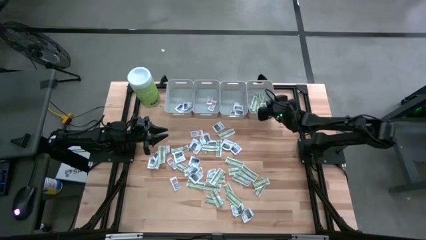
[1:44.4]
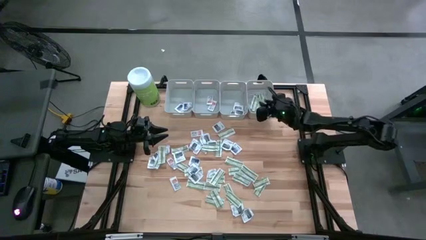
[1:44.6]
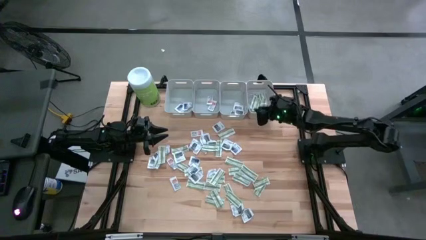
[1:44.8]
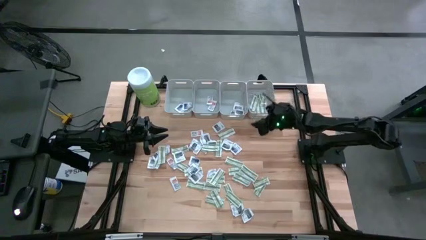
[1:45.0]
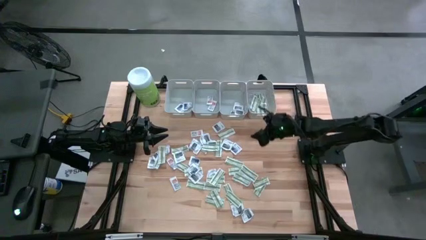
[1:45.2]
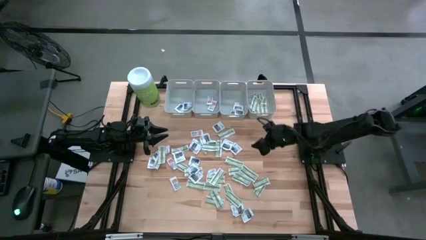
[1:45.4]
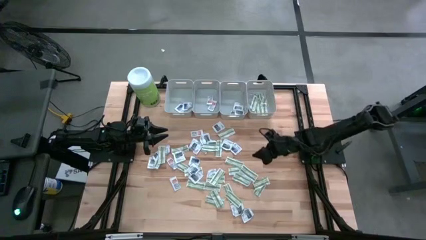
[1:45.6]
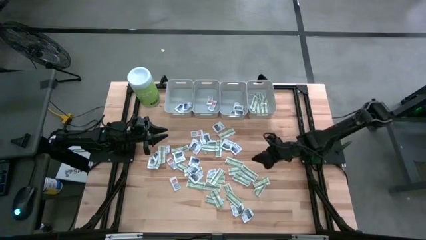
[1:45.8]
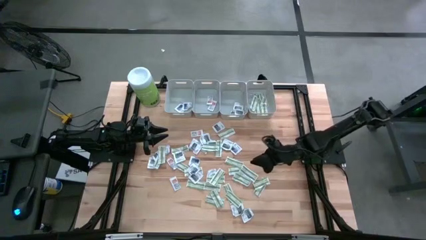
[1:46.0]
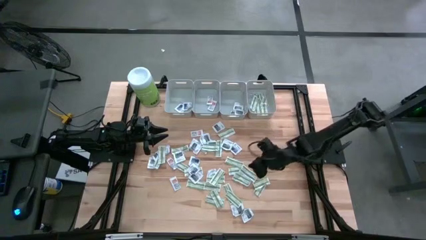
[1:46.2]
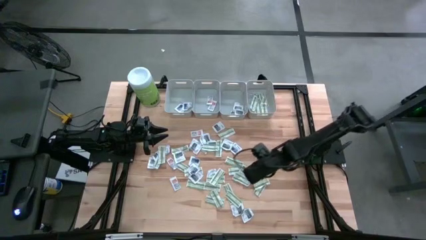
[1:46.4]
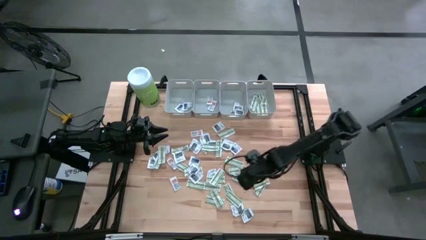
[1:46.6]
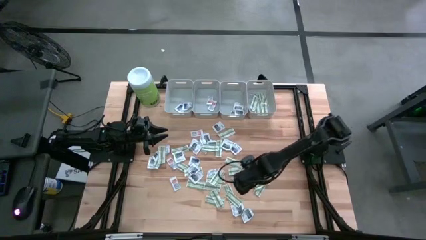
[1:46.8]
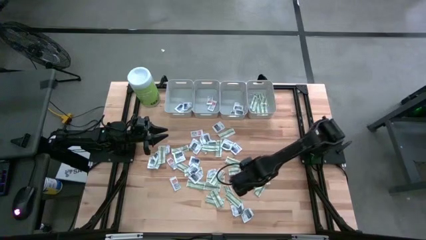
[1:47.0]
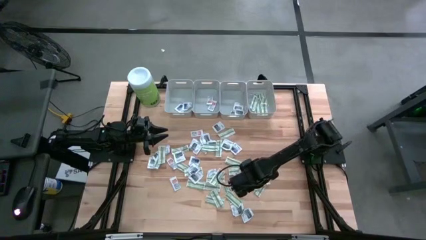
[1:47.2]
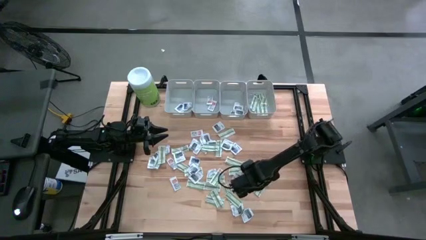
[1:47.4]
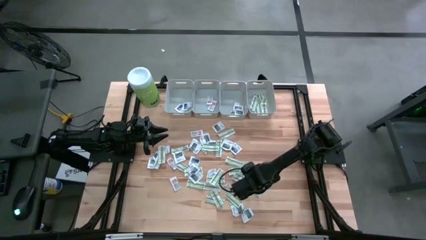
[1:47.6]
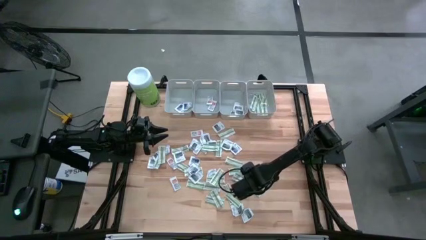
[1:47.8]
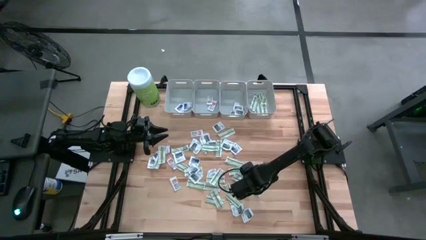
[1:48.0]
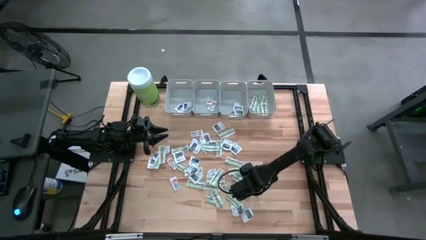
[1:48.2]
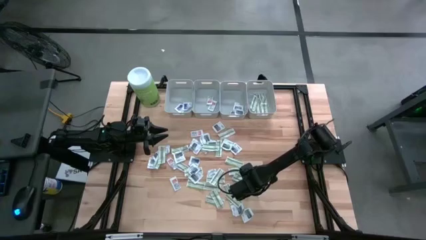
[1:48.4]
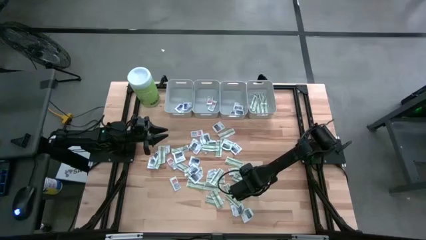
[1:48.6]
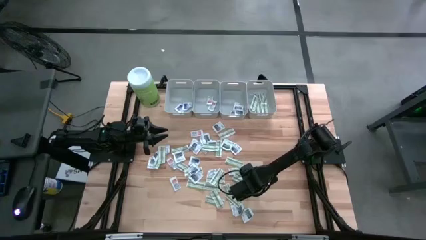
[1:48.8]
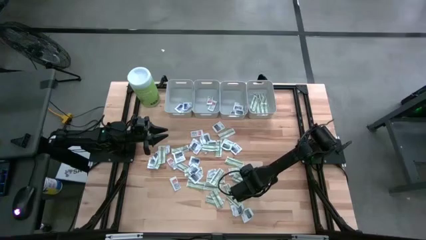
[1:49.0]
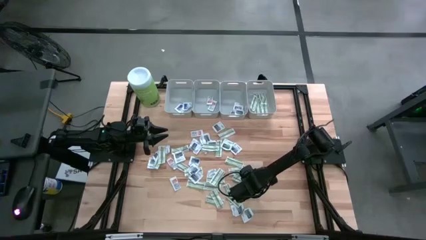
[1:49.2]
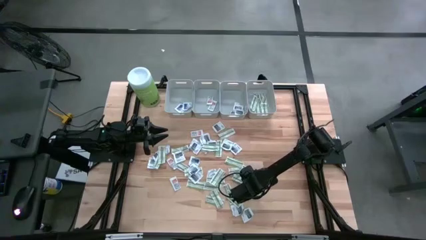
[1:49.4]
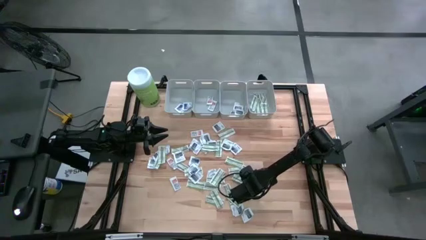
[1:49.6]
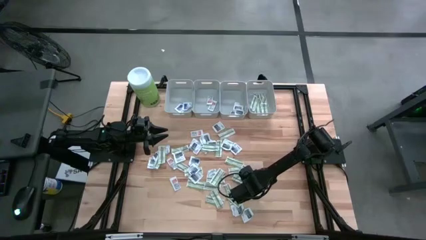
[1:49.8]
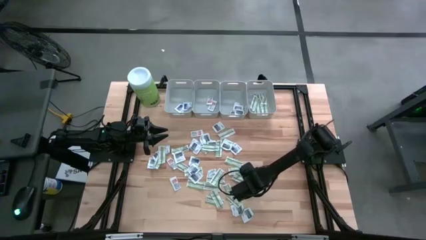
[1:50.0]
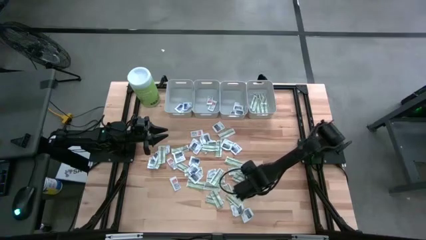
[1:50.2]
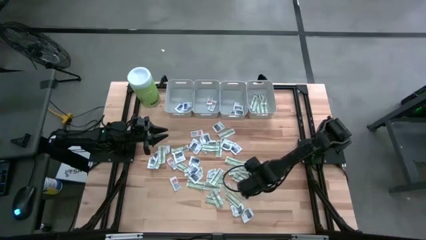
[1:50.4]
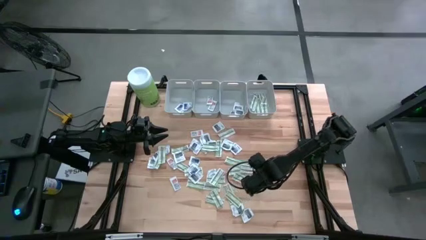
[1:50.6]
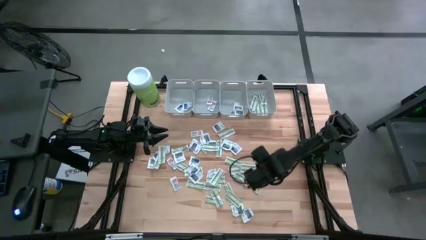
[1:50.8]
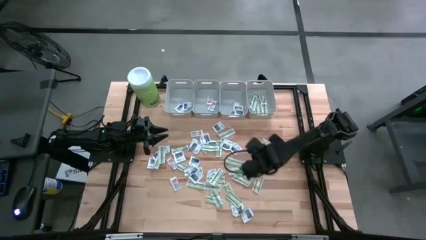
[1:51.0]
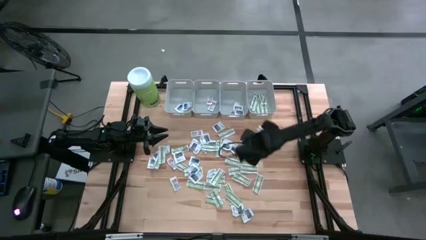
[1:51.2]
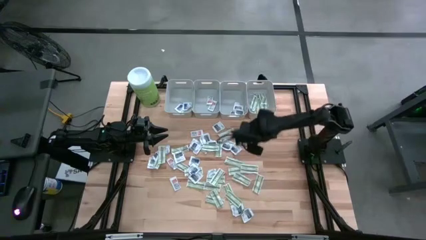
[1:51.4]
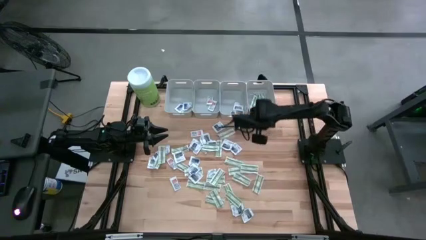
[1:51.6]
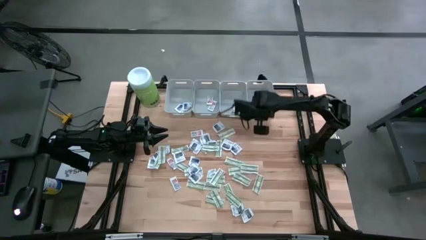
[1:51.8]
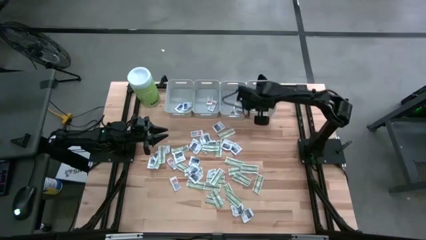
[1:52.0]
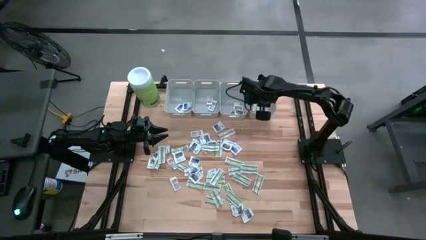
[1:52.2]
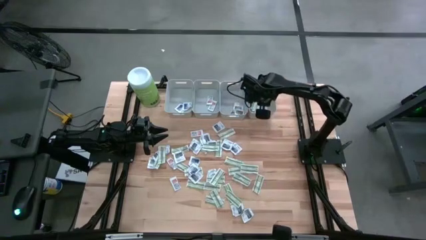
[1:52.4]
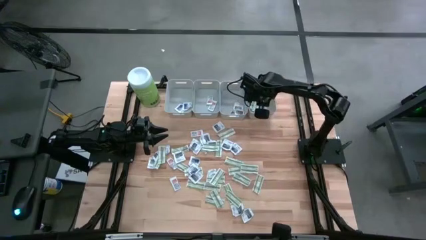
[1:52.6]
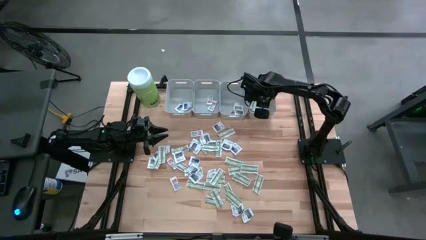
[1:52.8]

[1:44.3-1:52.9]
Task: Pick & Place First Aid Supplies
Put the bandage into the right gray bin

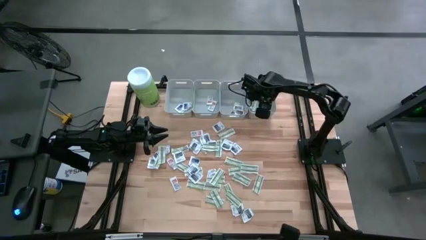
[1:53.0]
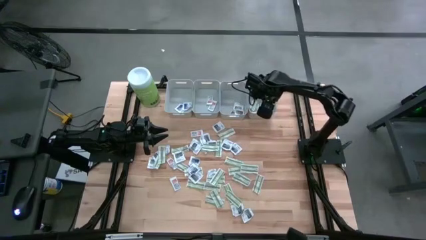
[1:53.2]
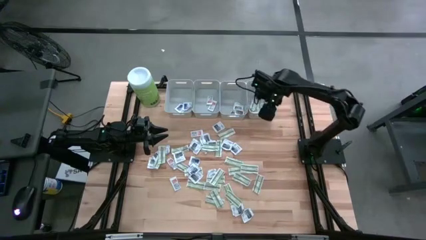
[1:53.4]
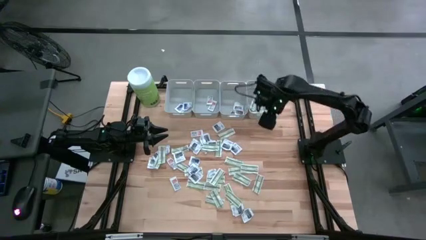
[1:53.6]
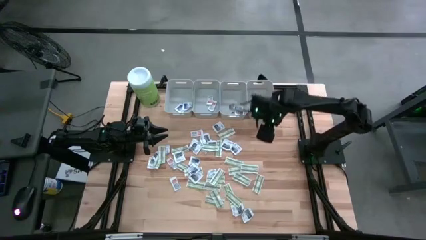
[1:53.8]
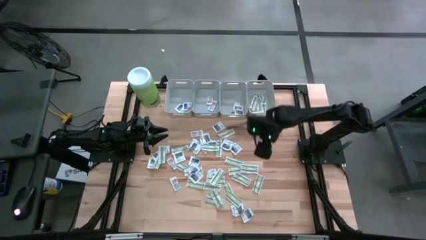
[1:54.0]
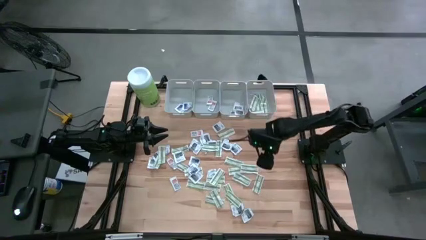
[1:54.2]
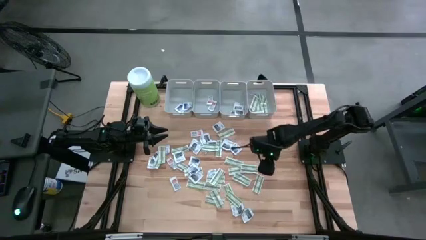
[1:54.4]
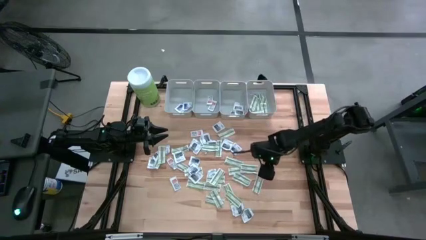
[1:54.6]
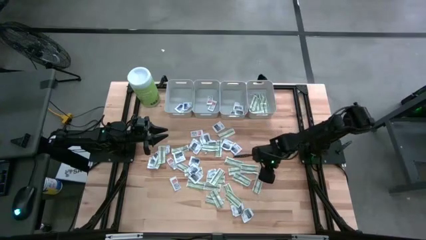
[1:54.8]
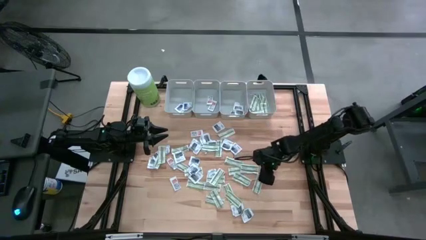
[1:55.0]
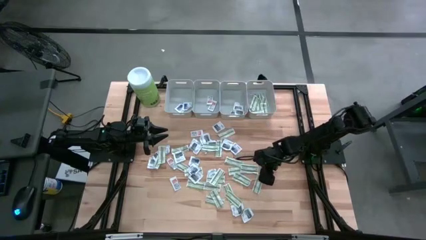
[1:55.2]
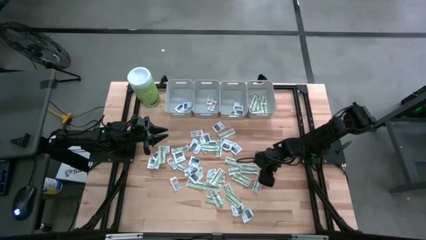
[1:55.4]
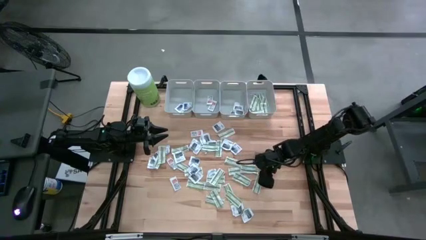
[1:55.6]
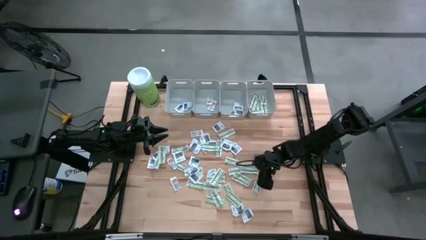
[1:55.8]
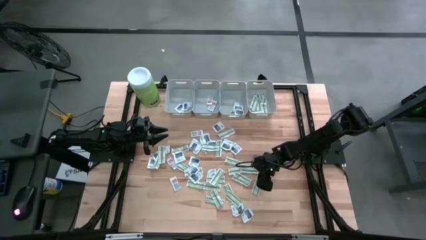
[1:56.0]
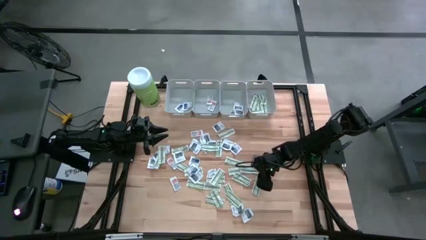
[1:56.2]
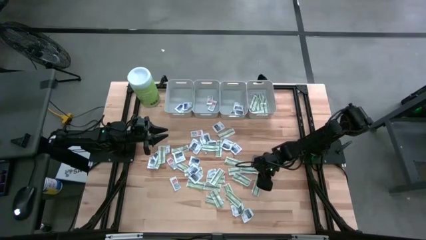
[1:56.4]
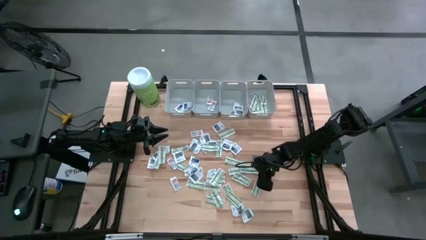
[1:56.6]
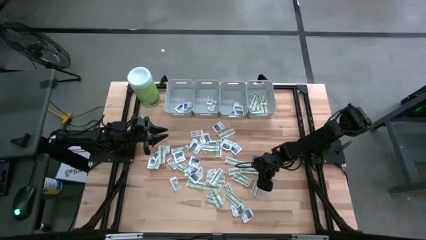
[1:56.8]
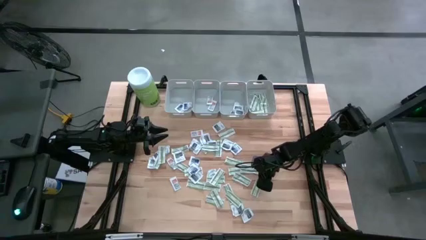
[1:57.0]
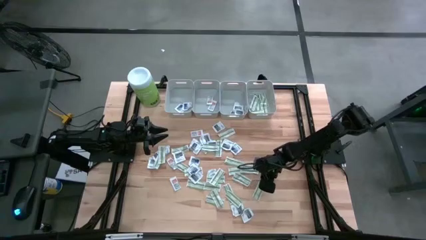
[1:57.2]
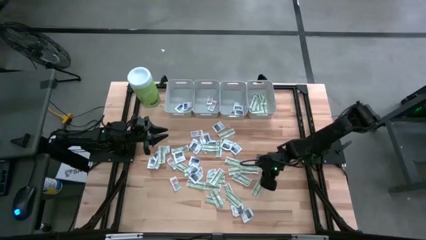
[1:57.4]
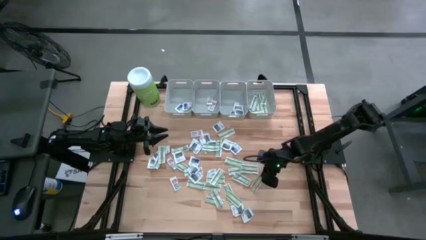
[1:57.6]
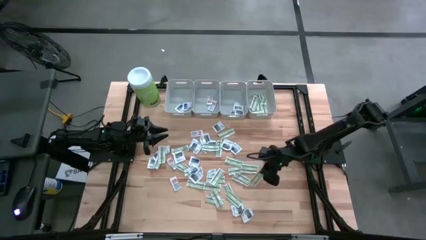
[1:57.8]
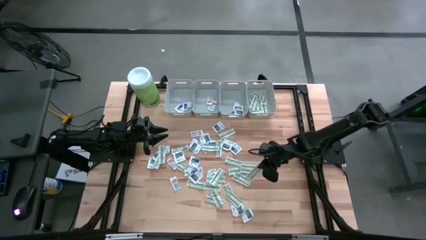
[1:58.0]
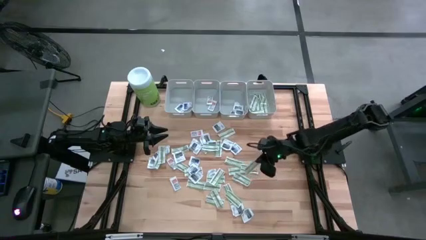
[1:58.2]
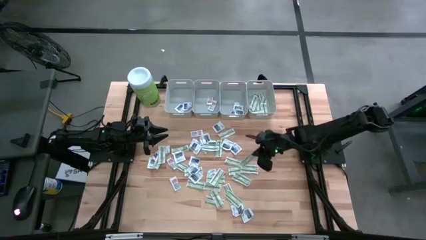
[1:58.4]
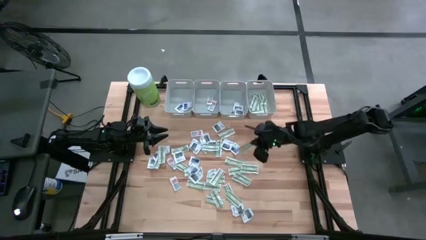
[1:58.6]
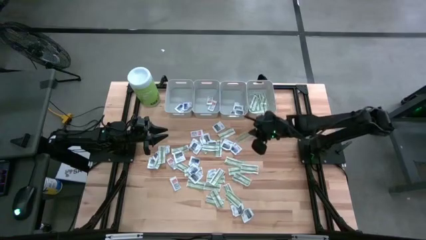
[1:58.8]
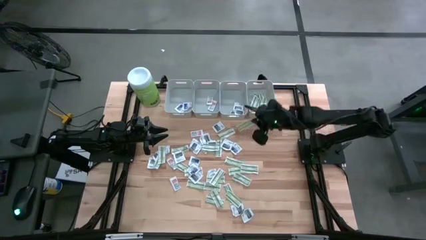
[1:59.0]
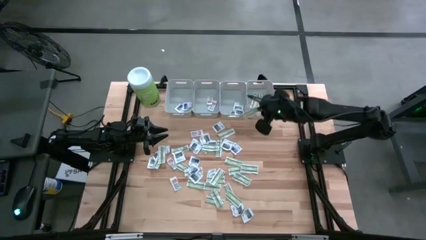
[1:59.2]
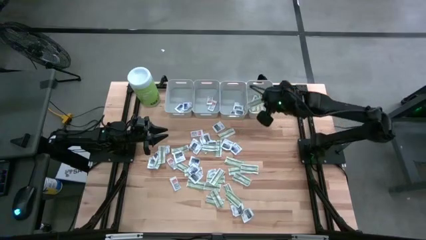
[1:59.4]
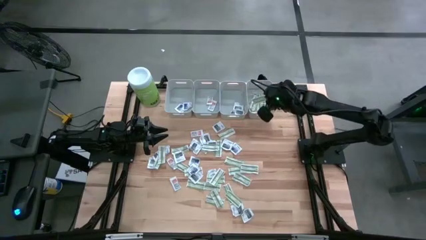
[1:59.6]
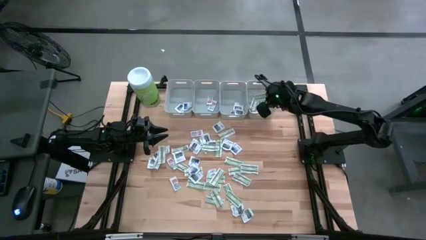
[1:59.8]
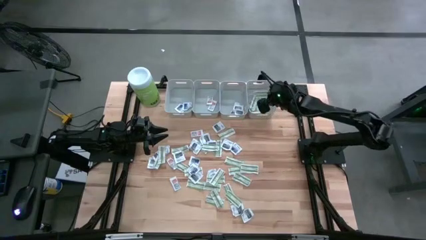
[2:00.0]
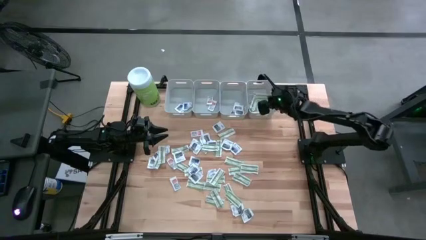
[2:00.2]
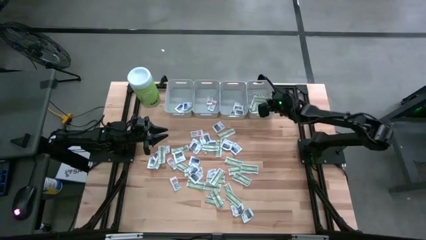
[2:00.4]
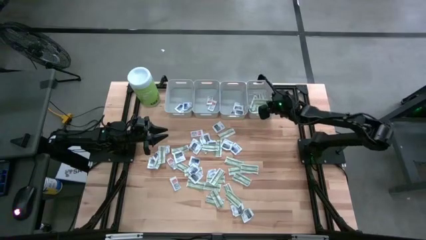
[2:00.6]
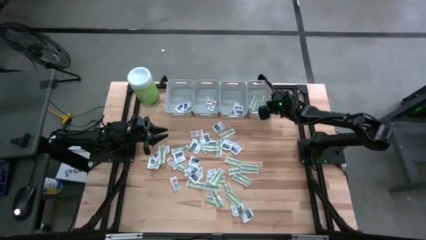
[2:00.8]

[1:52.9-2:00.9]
Put the bandage into the right gray bin

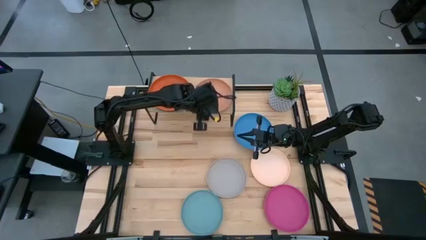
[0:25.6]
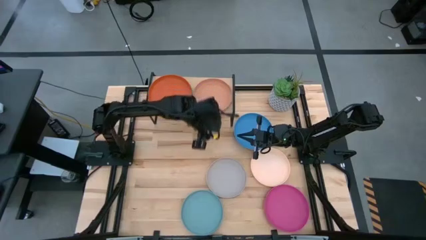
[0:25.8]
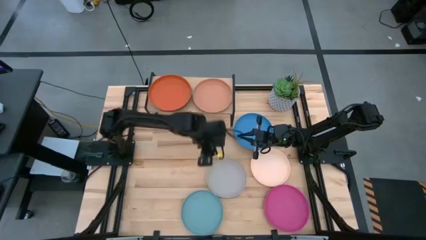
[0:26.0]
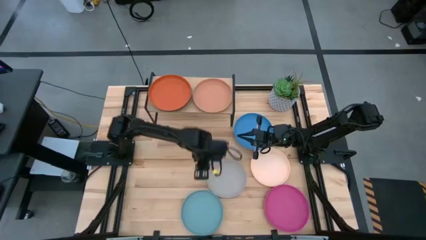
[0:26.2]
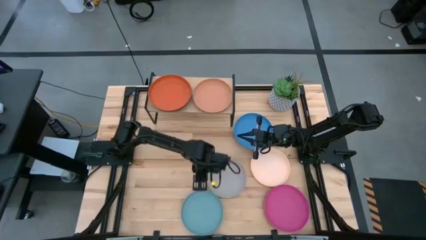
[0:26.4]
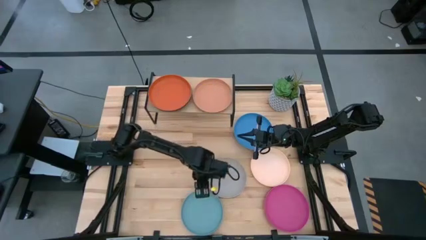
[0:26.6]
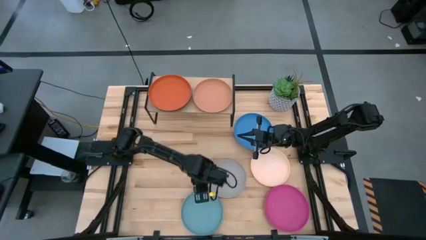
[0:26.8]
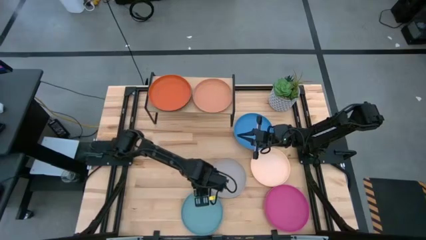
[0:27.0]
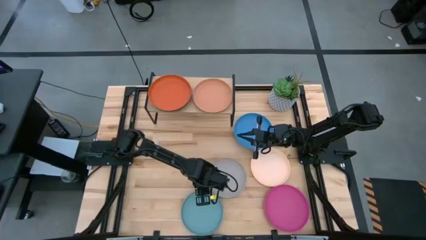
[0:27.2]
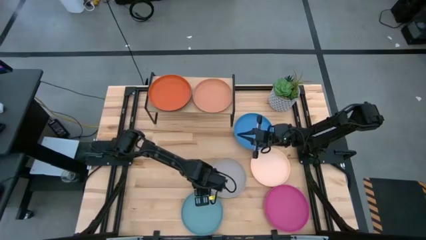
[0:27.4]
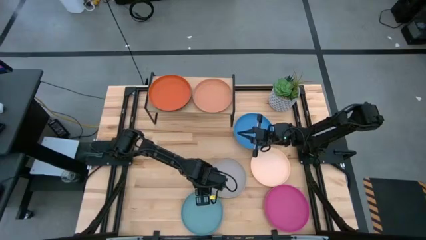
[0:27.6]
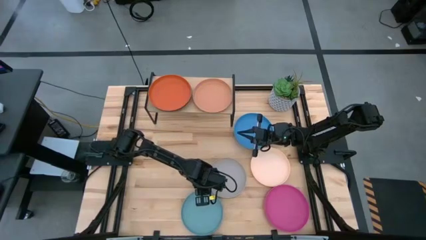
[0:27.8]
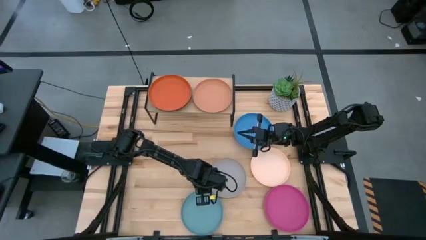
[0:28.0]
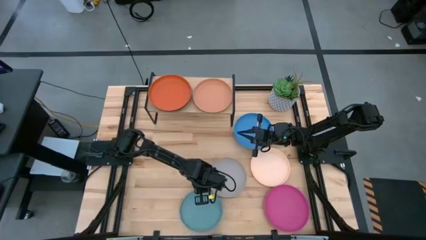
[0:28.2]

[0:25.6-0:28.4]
Task: Place and stack plates onto a shelf
Stack the light blue plate on top of the light brown plate on the shelf
